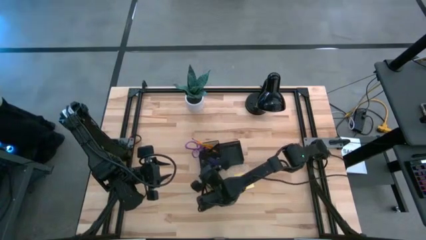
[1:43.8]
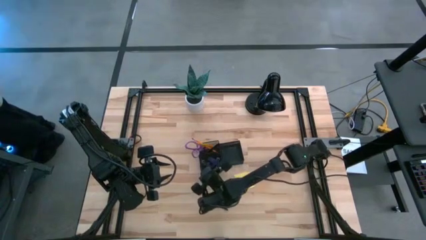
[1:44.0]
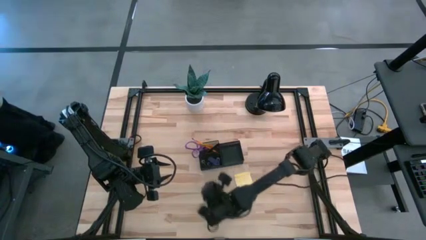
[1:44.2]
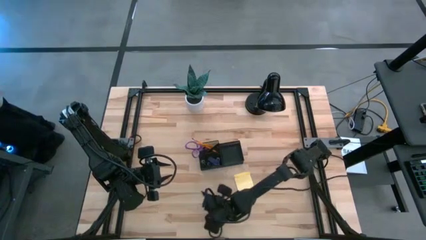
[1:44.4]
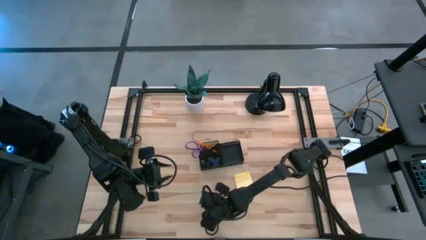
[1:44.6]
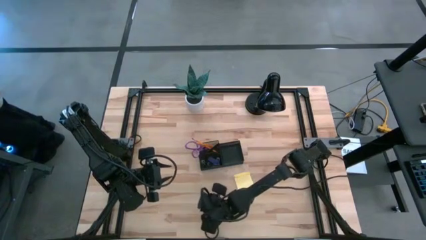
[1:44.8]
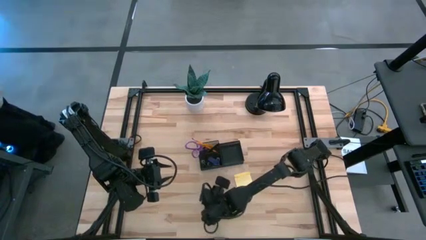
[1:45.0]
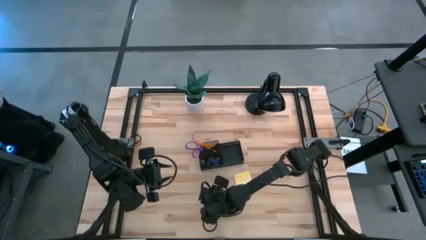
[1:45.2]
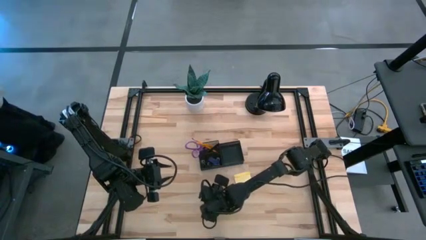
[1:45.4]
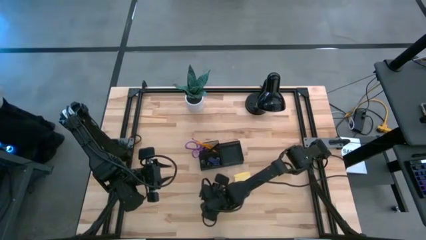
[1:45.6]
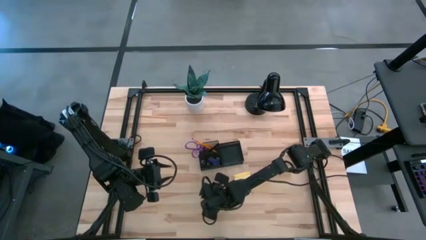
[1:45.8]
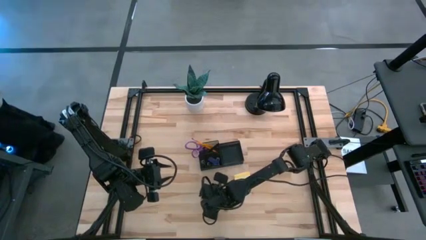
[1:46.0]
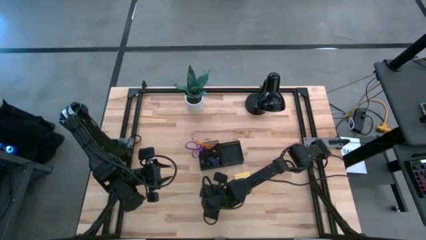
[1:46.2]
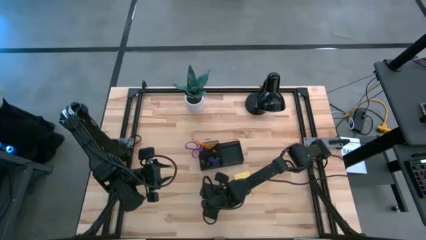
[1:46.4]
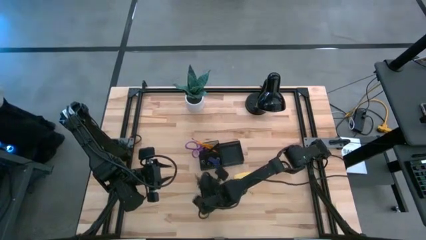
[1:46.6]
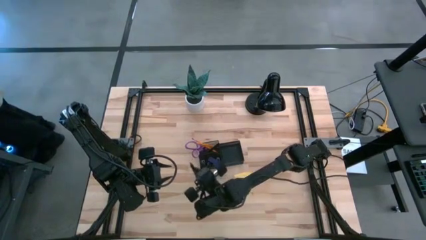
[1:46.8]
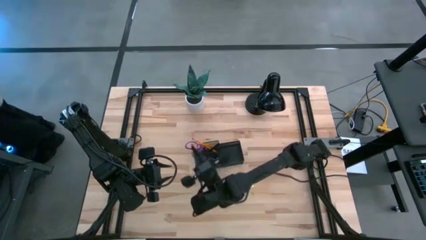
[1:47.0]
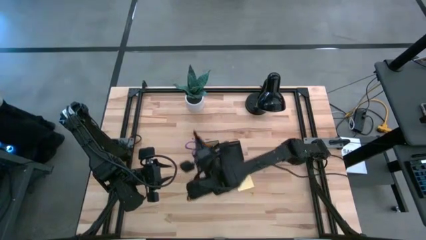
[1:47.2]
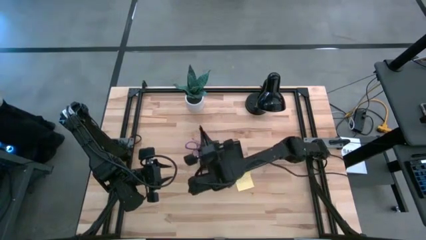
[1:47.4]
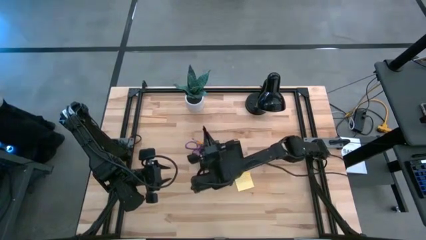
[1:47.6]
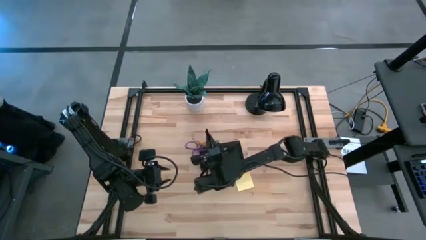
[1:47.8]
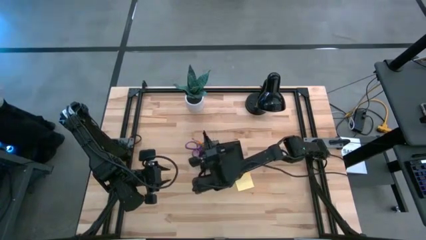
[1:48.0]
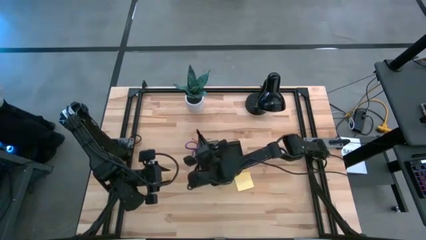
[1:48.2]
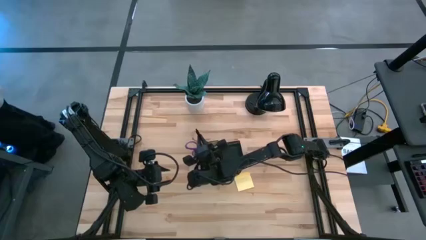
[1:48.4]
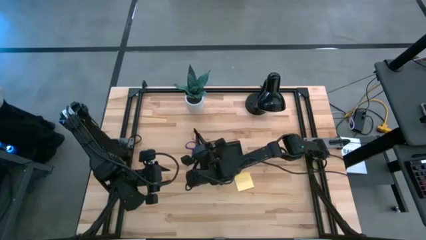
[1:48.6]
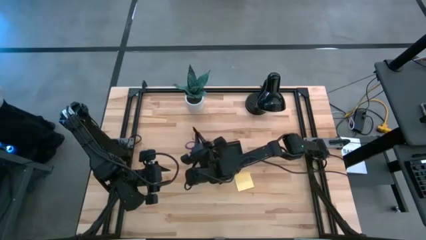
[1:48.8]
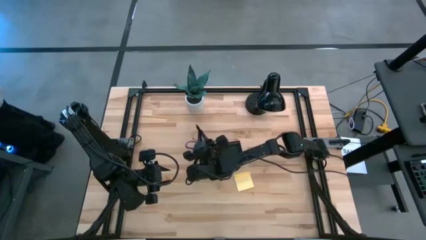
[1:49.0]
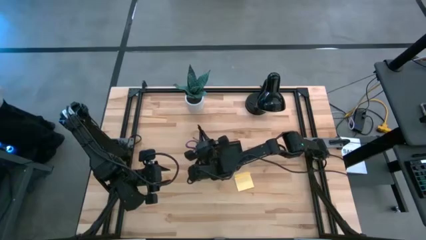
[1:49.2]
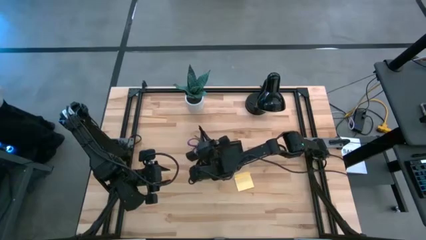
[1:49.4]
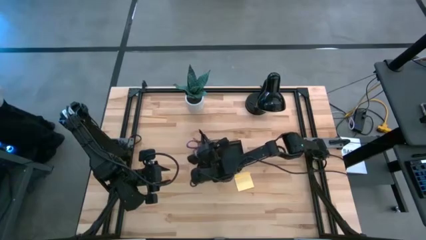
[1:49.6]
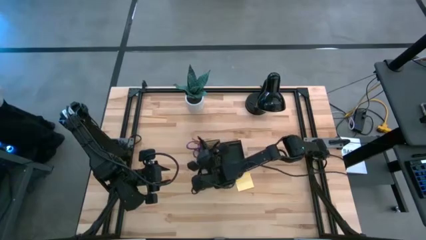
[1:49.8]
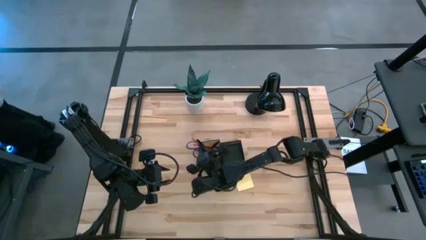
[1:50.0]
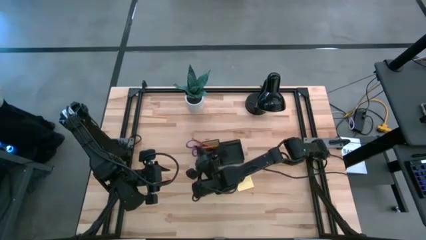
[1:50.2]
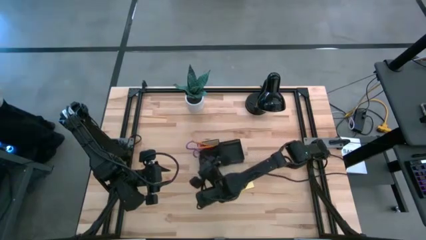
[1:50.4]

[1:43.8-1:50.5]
Task: Pick and place office supplies into organizer
Put the pen into the desk organizer

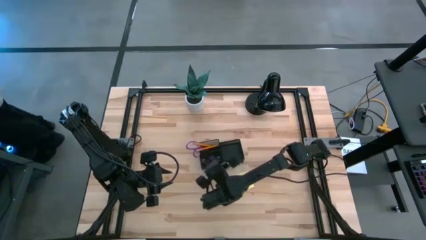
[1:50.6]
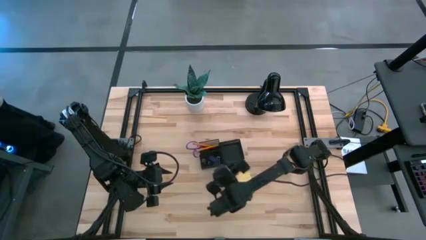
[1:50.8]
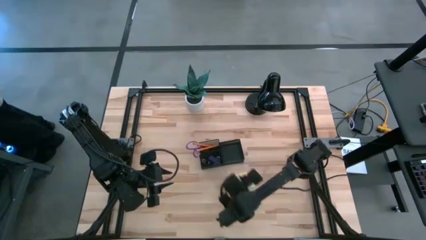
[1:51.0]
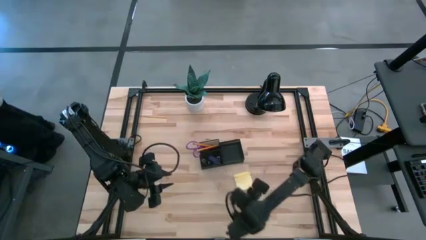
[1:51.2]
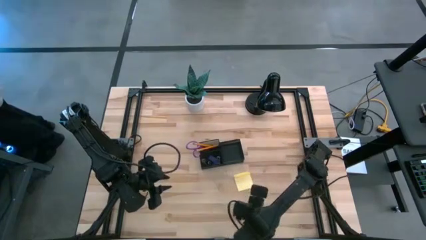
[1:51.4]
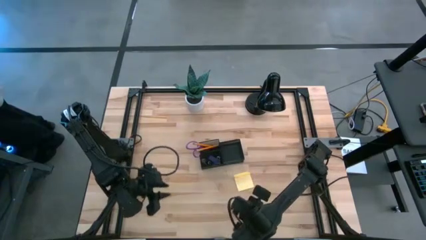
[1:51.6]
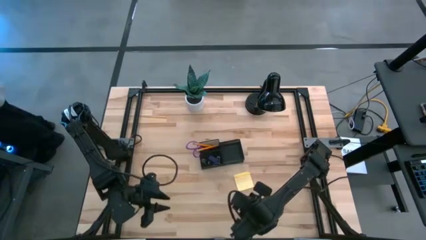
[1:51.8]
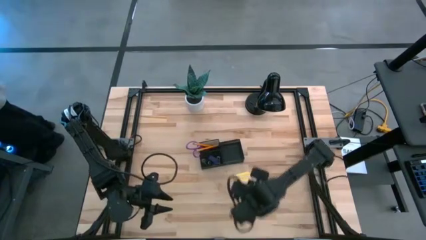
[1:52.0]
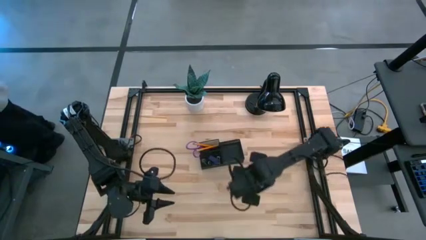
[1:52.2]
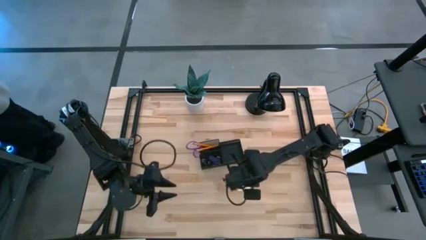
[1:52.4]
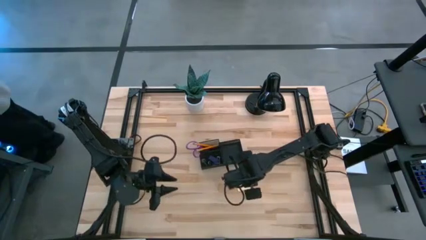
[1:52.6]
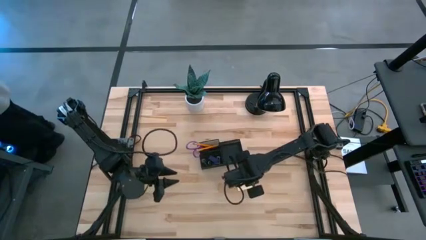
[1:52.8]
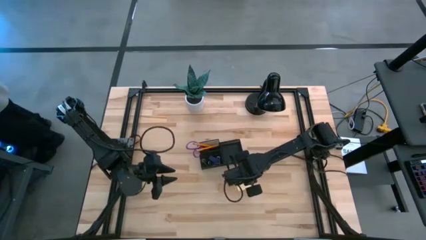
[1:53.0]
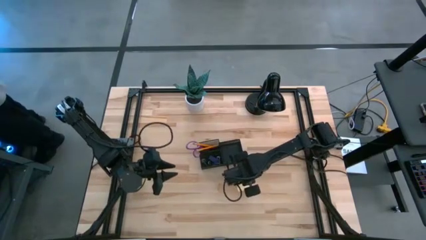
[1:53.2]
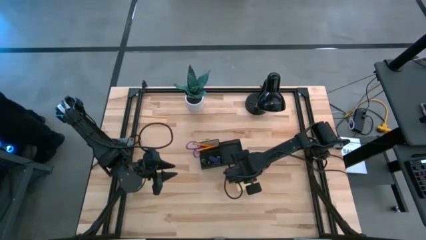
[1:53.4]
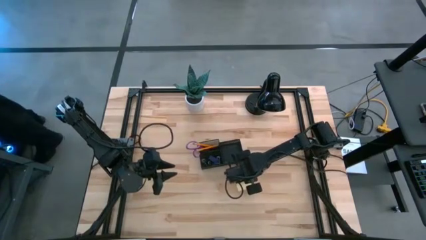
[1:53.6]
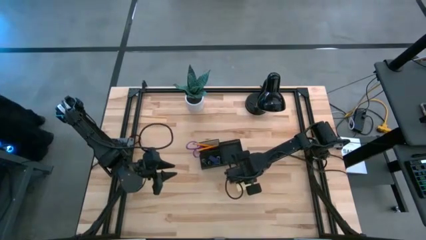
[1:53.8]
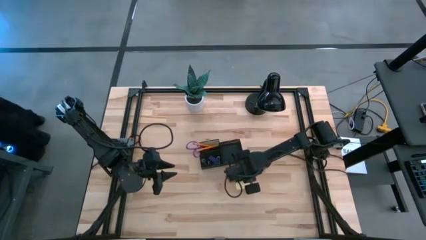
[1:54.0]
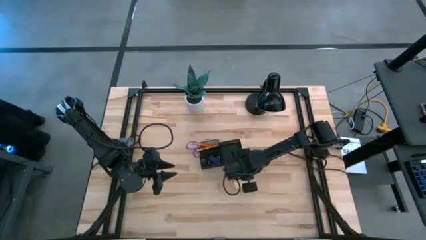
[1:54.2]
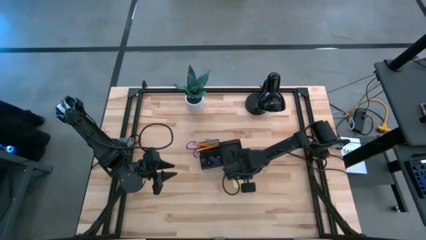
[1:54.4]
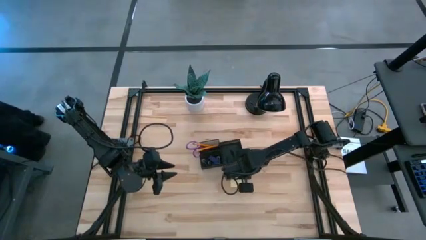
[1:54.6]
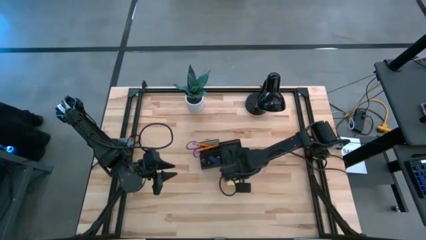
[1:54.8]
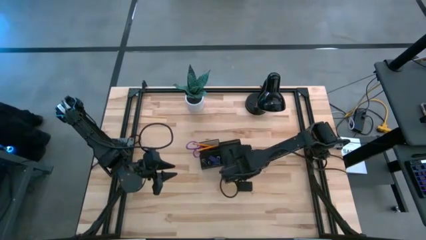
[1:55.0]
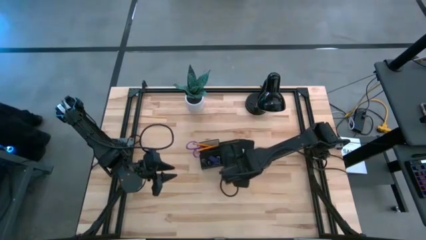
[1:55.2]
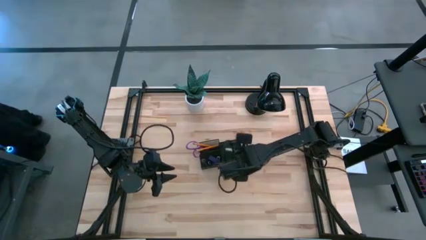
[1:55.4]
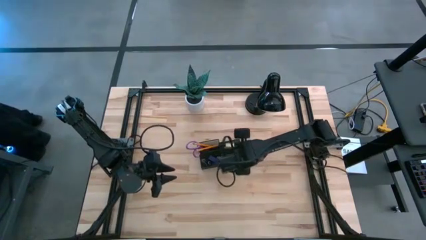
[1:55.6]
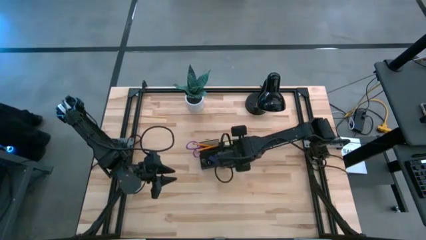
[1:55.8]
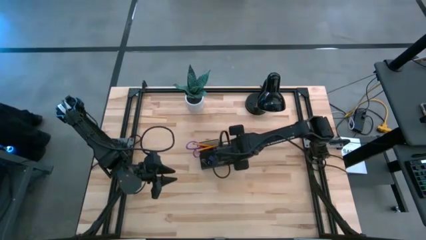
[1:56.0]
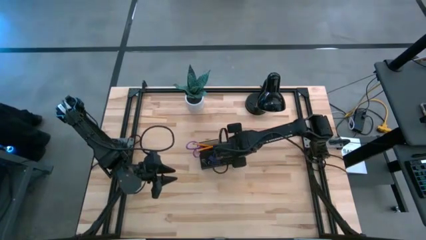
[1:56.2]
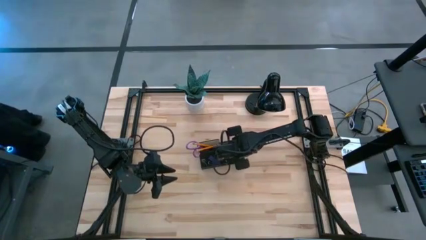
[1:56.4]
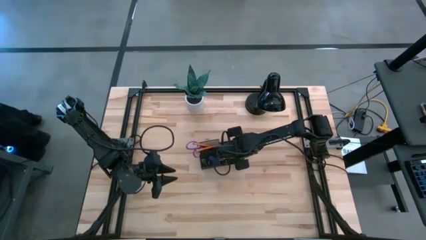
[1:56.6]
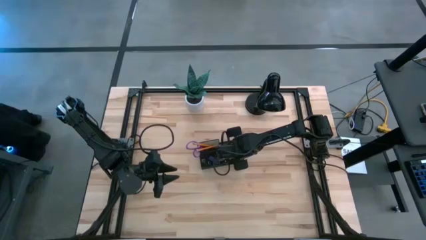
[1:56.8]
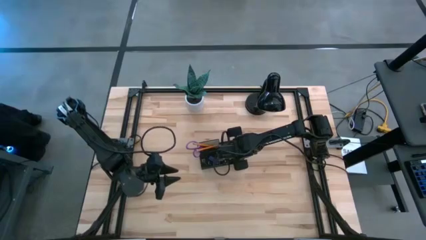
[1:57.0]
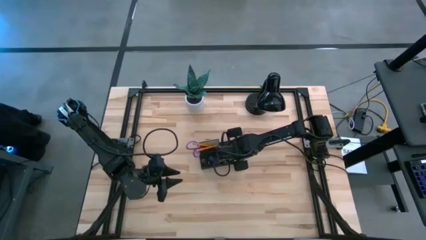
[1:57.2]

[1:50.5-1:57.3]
Put the sticky notes into the desk organizer

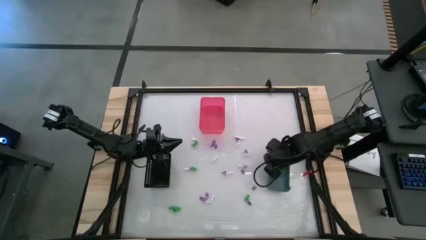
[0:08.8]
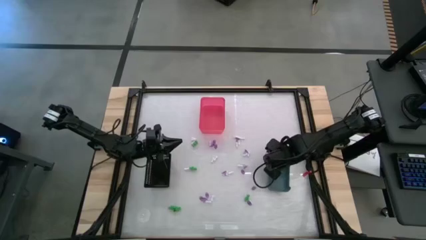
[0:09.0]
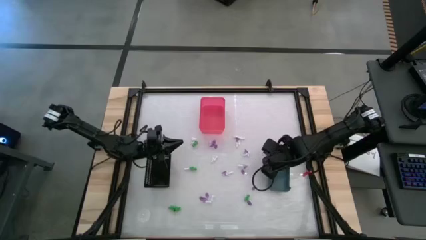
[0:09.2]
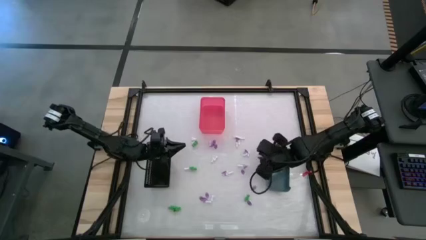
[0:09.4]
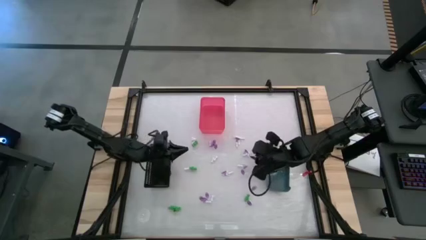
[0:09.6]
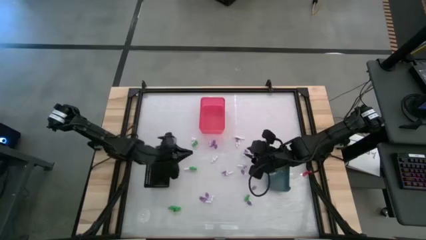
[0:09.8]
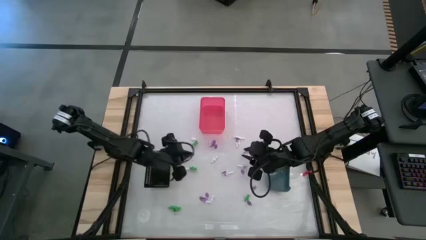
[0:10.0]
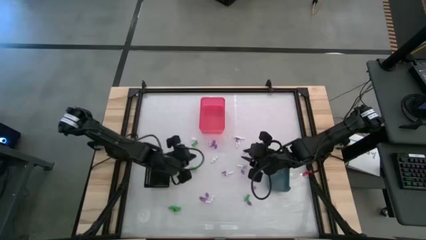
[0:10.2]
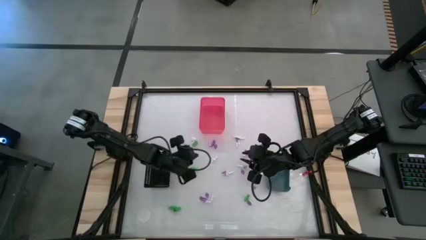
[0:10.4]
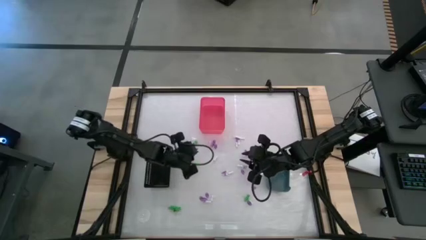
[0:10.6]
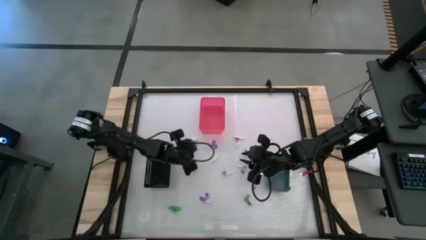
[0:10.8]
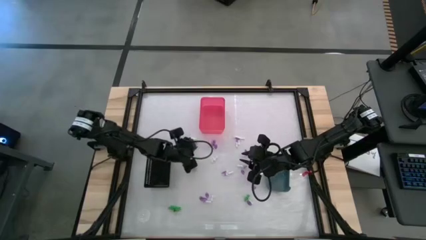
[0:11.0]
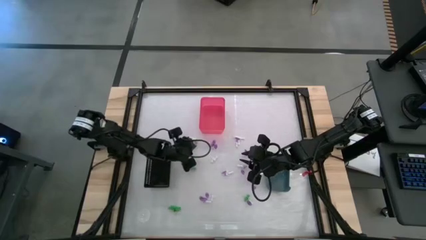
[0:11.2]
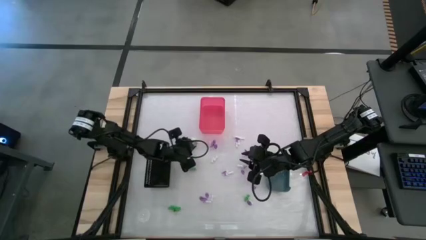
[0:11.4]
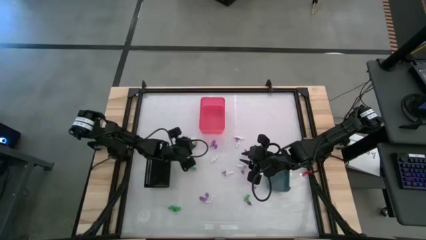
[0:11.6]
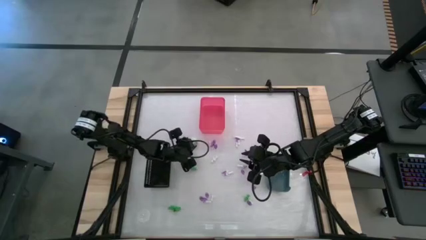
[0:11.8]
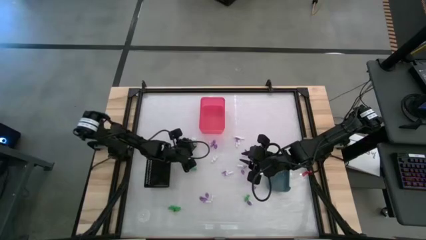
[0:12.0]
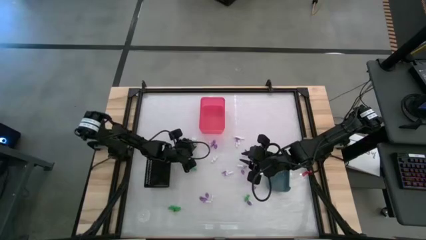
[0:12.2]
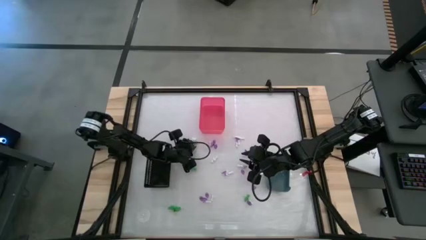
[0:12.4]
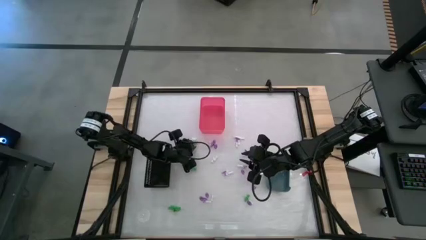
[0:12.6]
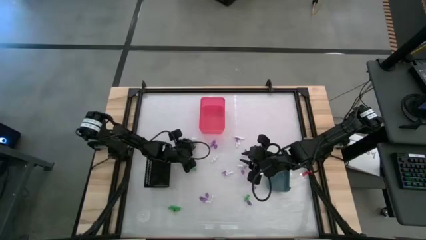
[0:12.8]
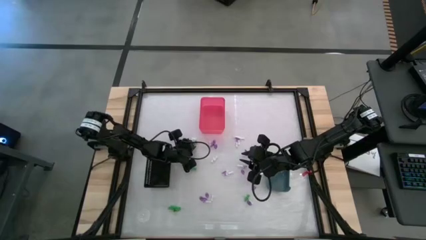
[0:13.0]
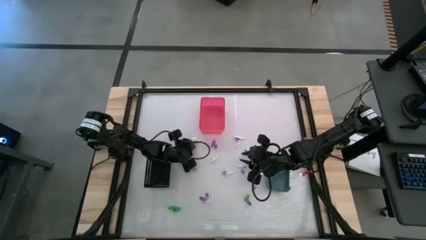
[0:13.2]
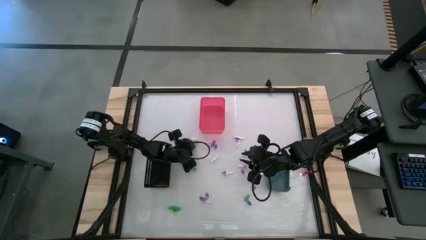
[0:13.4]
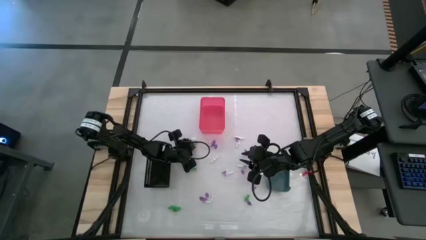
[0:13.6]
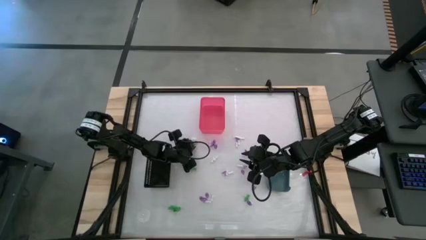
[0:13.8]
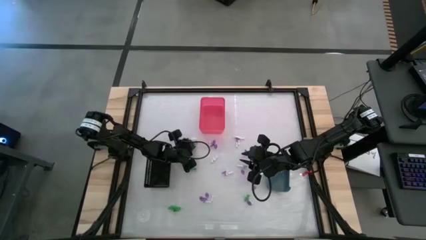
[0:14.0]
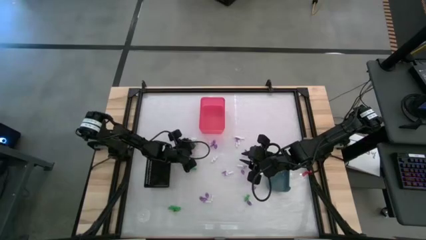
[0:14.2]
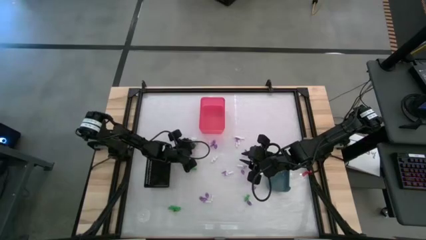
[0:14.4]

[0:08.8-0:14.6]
Task: Sort Halloween decoration
Put the skeleton toy into the black basket
